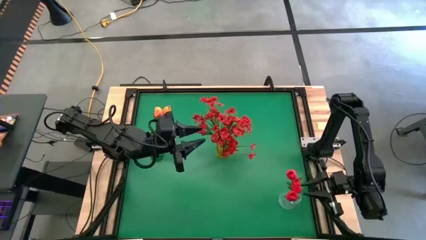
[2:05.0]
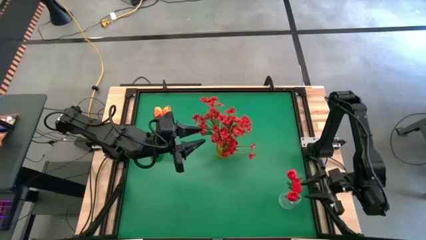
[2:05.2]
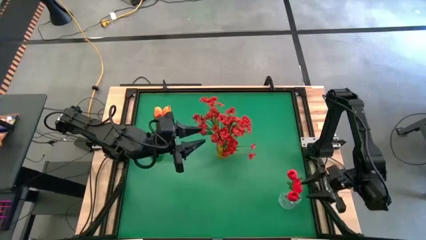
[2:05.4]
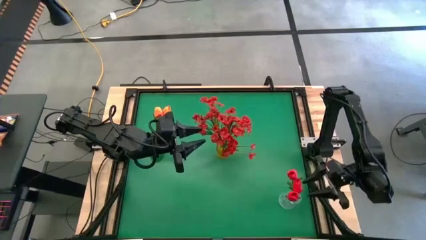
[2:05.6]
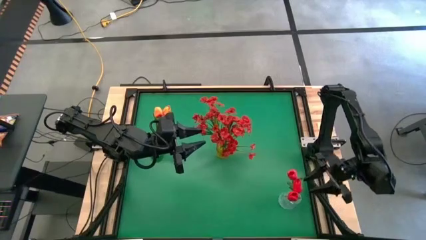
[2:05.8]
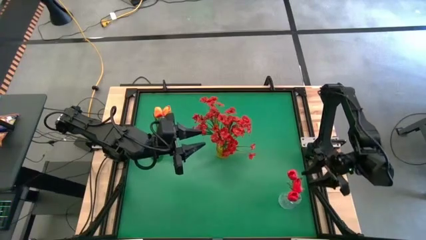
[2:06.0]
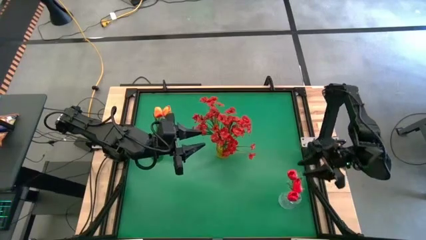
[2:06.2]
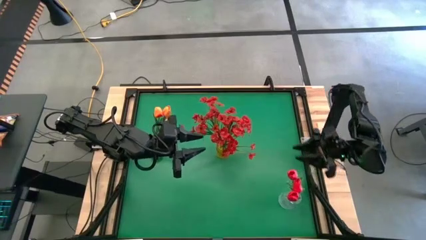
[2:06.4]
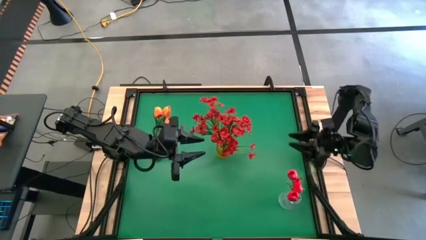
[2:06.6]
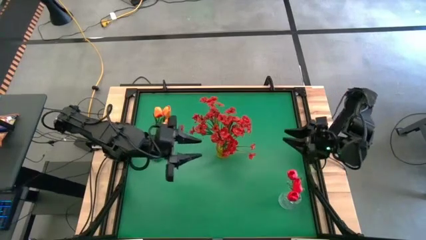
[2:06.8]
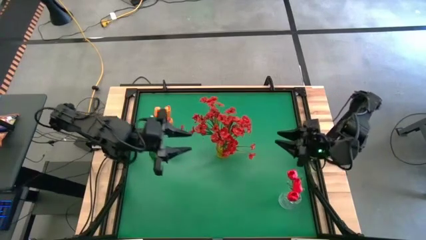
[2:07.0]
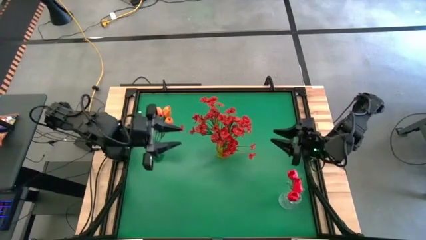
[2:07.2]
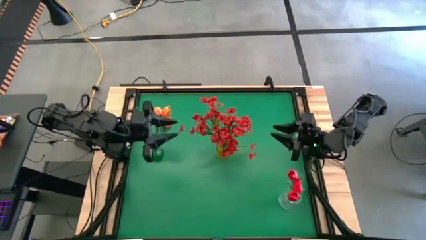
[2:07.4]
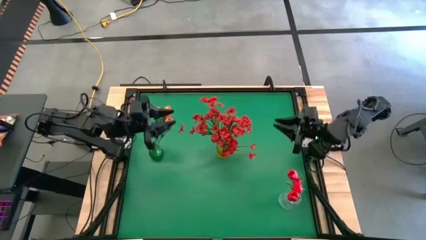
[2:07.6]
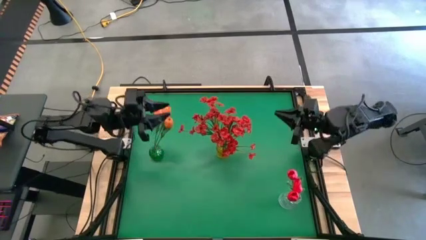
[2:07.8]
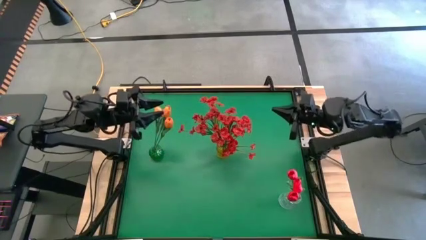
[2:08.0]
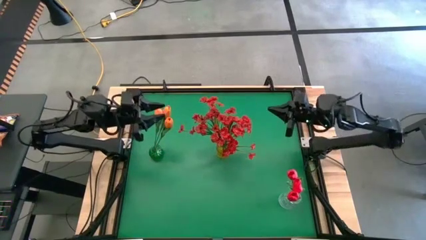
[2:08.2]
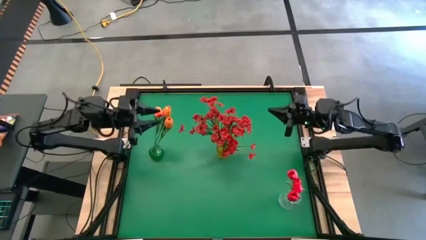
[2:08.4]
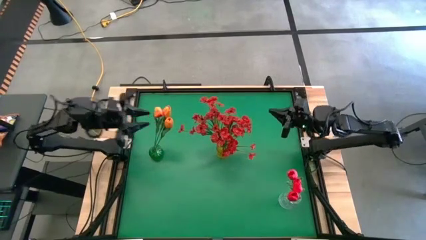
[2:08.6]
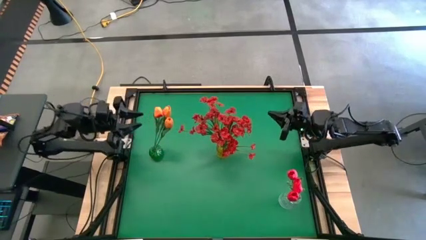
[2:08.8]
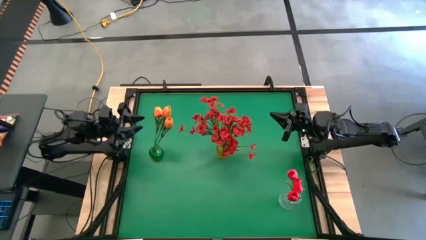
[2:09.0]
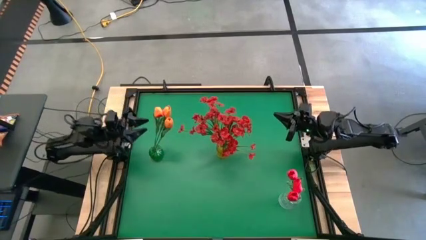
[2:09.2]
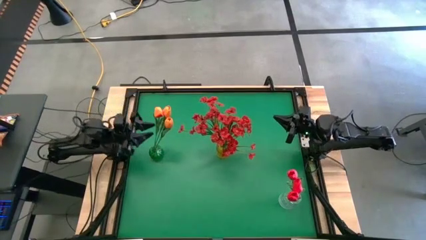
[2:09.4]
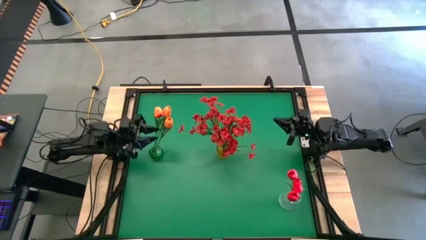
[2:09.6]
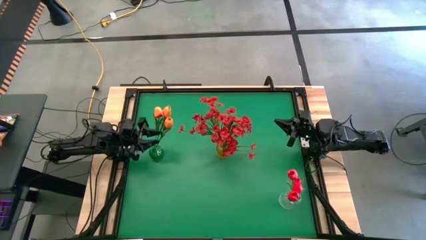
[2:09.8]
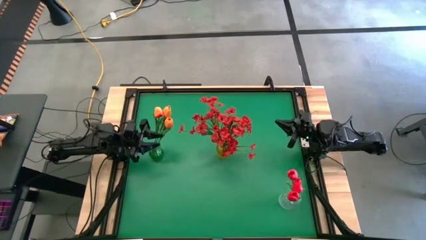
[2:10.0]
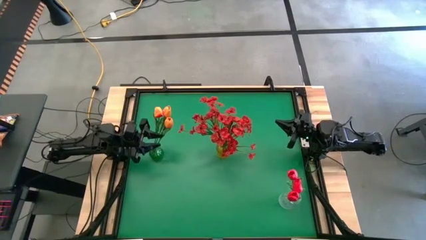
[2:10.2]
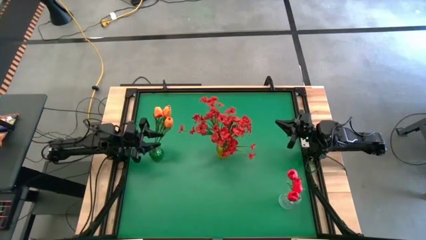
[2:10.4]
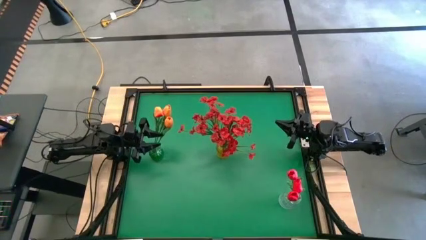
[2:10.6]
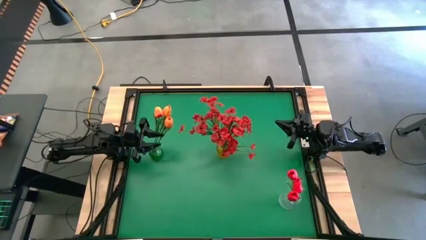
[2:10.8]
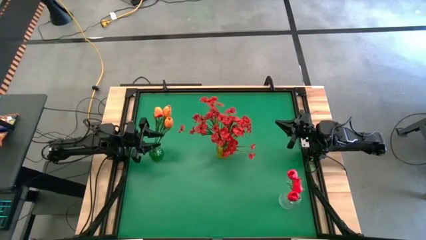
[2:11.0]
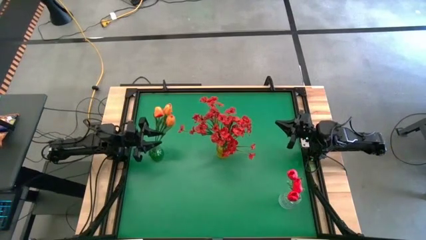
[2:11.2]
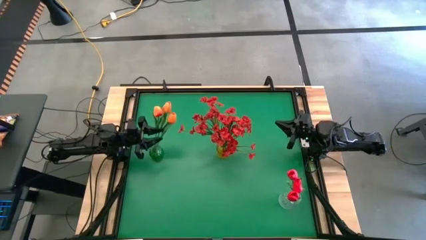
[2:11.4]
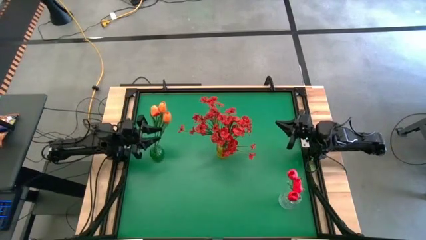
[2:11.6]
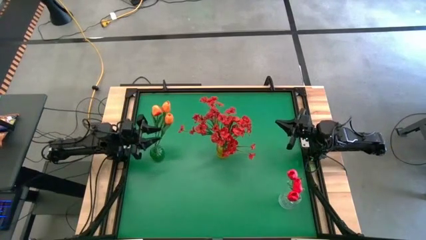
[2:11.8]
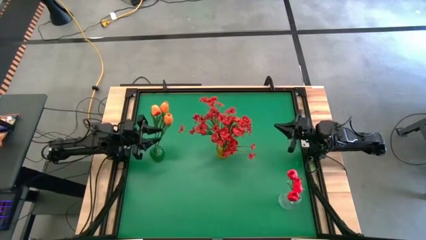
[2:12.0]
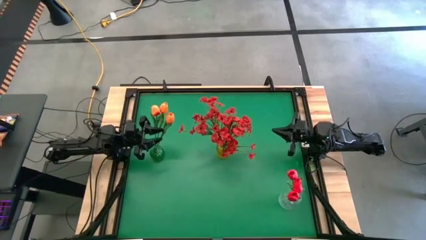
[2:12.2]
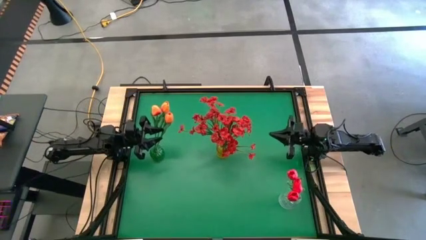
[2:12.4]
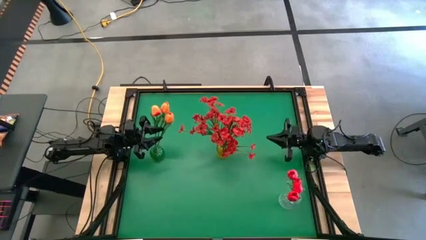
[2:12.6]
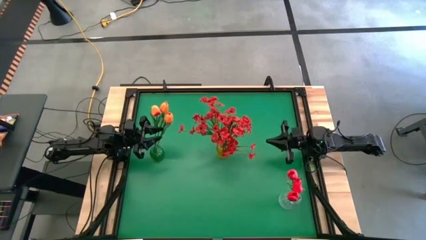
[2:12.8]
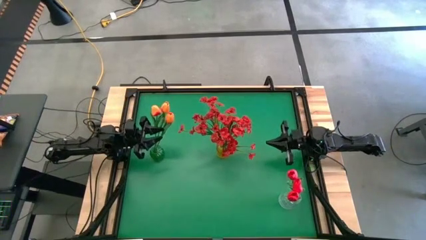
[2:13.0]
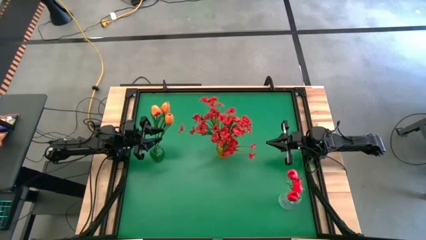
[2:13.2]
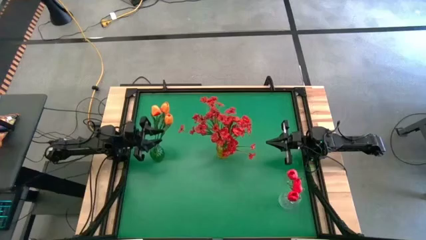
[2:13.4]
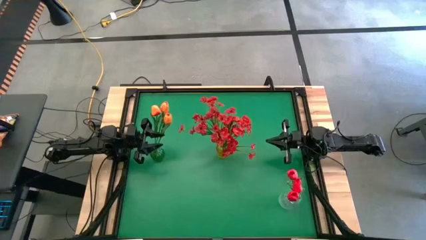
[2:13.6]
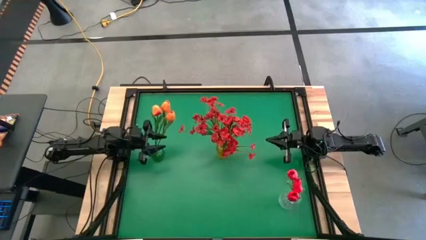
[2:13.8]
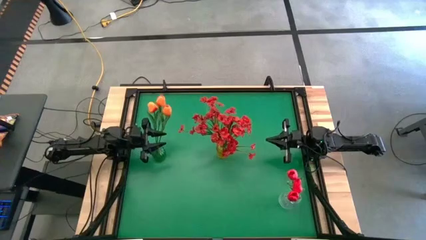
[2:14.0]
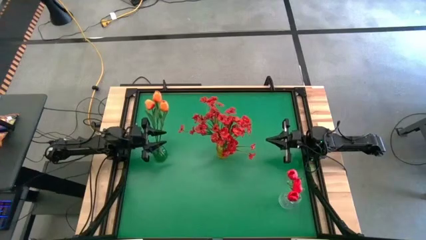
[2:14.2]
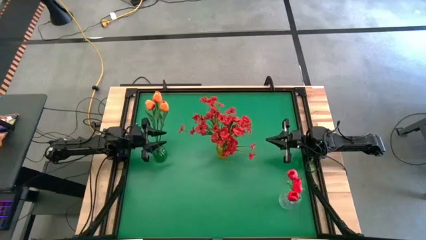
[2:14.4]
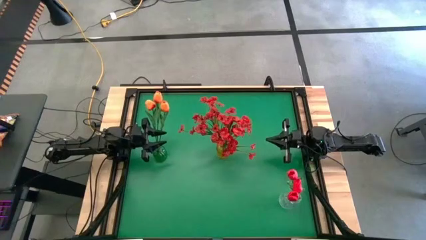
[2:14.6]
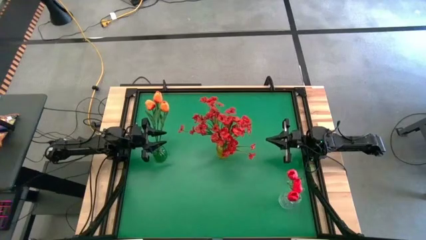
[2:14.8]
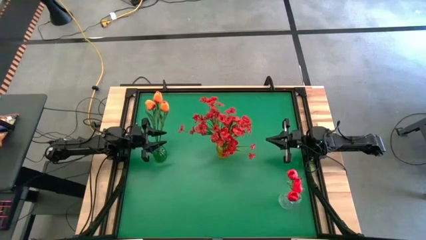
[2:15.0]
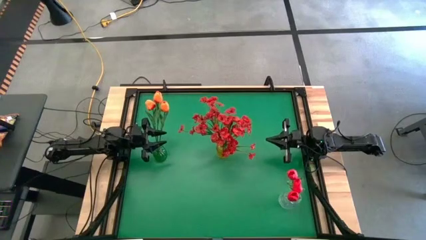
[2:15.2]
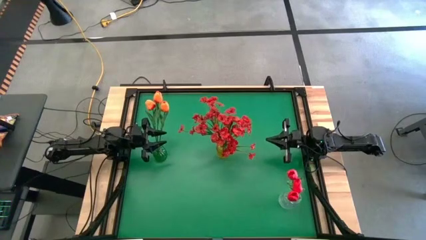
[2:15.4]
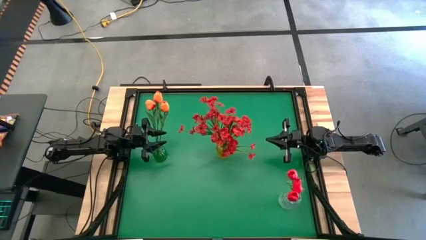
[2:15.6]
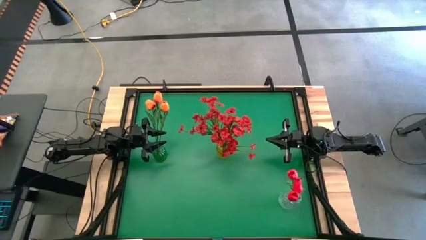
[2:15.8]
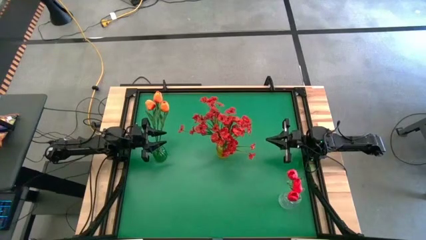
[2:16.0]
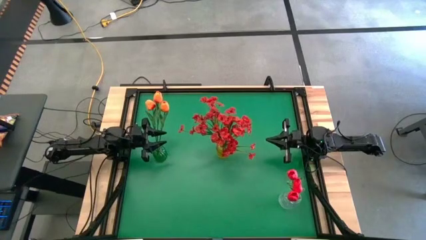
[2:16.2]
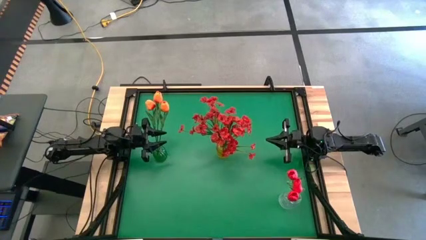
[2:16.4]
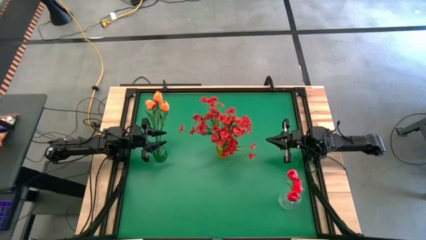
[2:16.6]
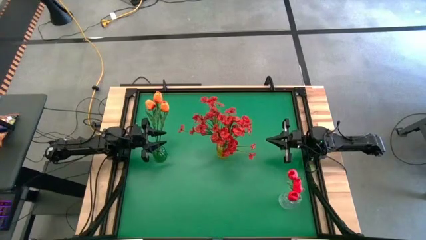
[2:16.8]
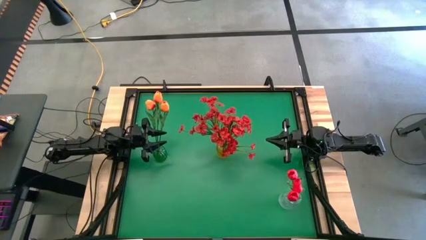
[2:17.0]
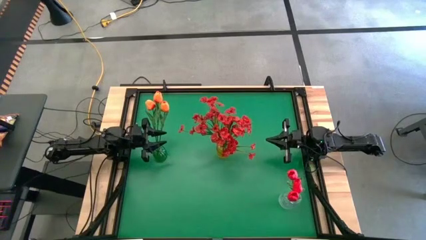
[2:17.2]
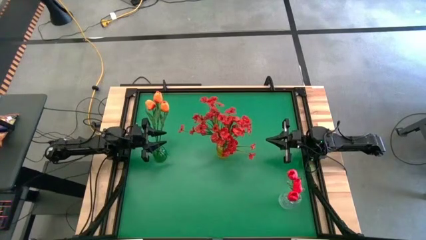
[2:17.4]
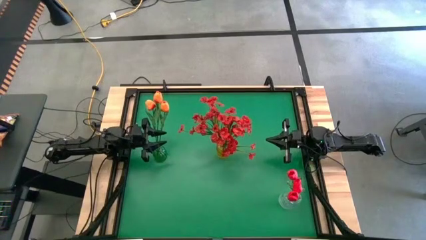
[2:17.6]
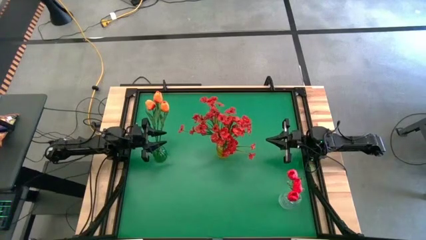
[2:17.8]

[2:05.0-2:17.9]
Task: Sort flowers into vase by color
Return to Home Position
